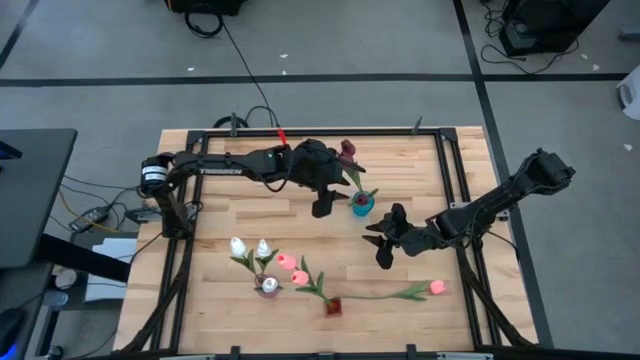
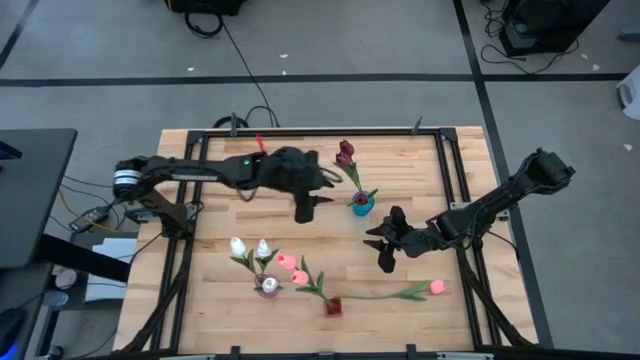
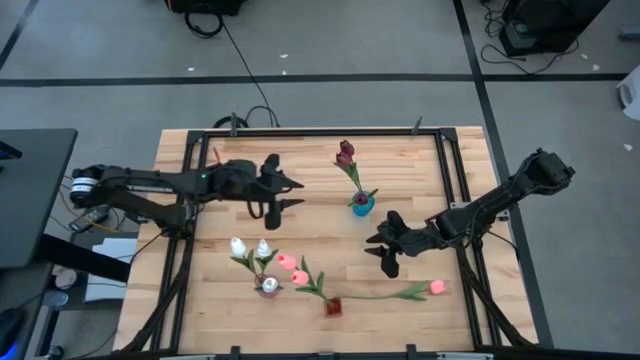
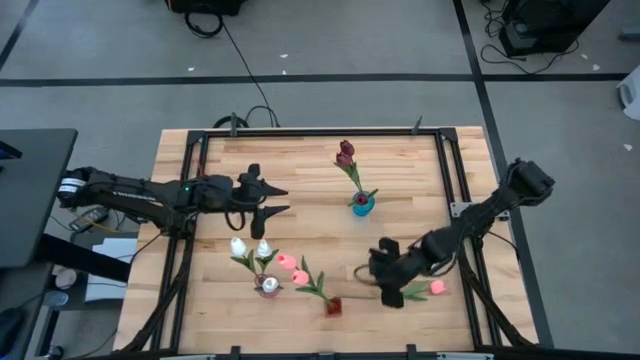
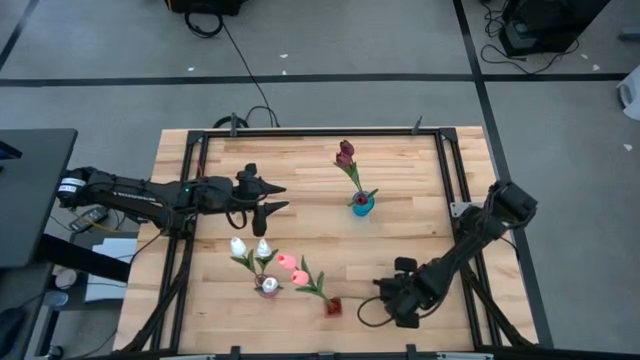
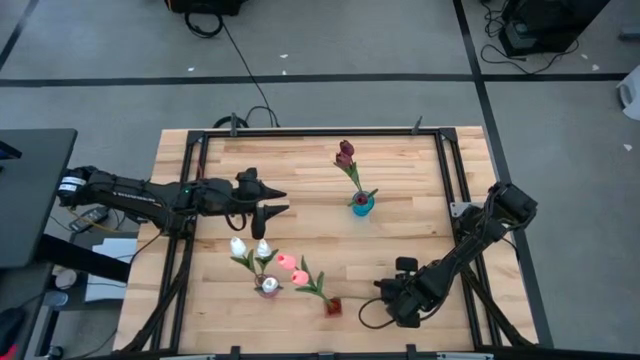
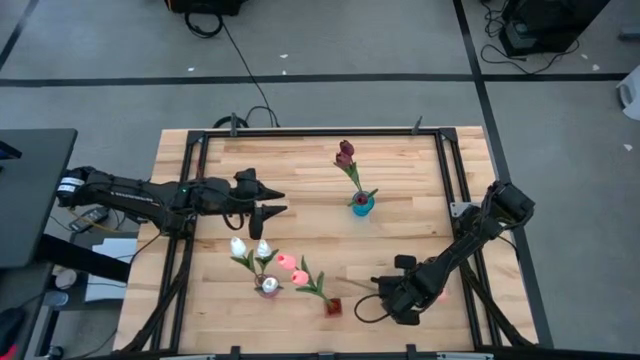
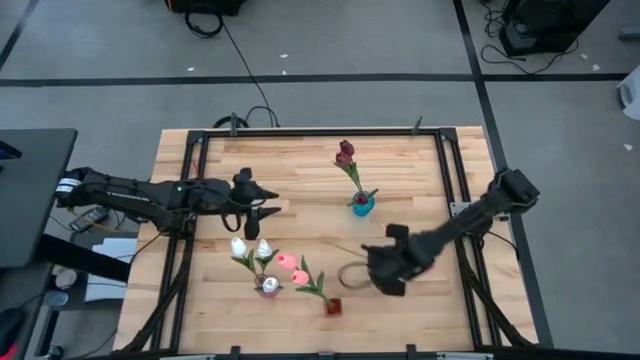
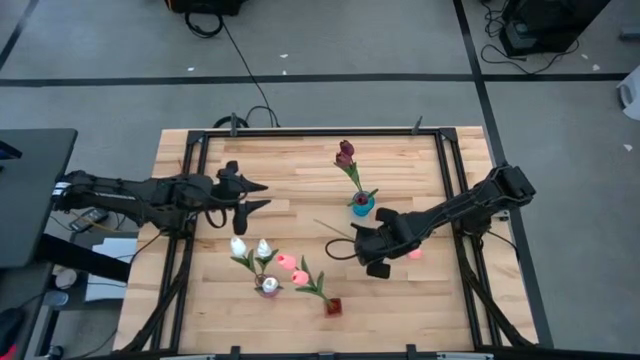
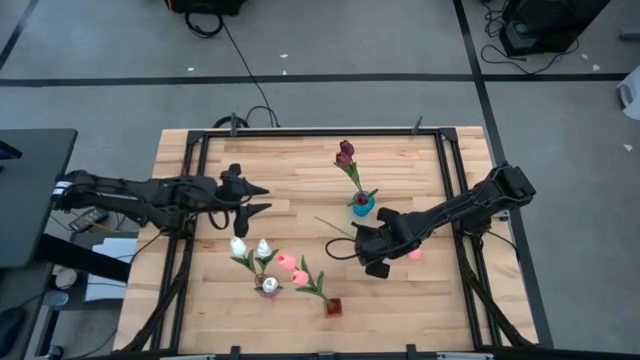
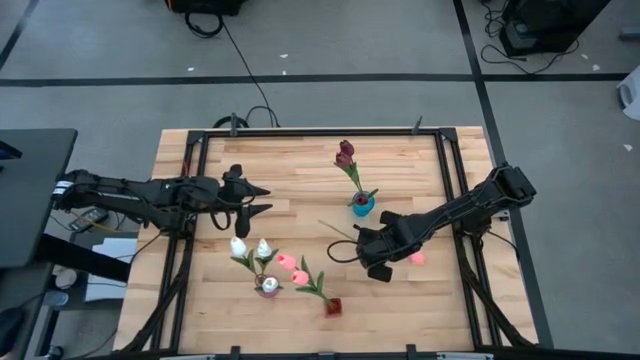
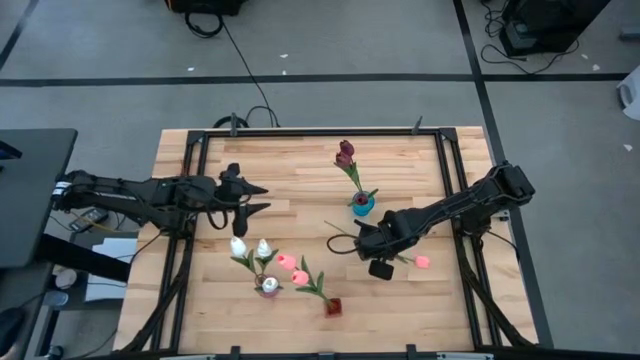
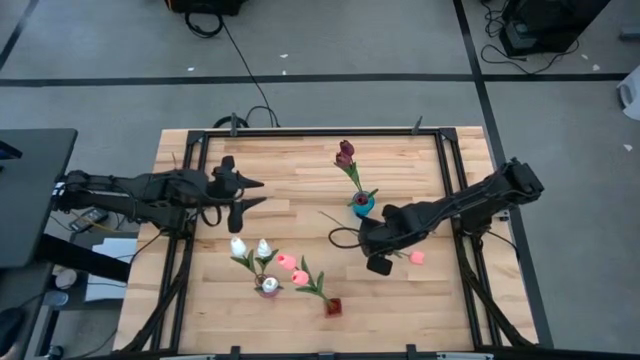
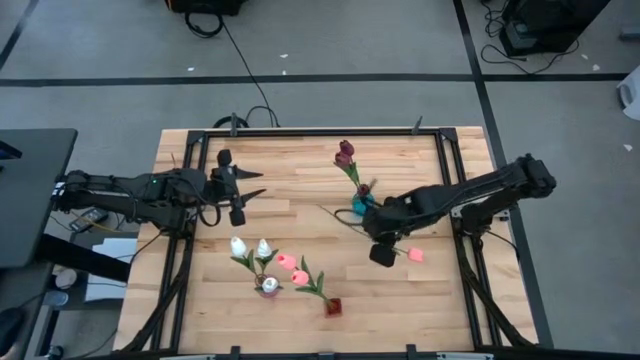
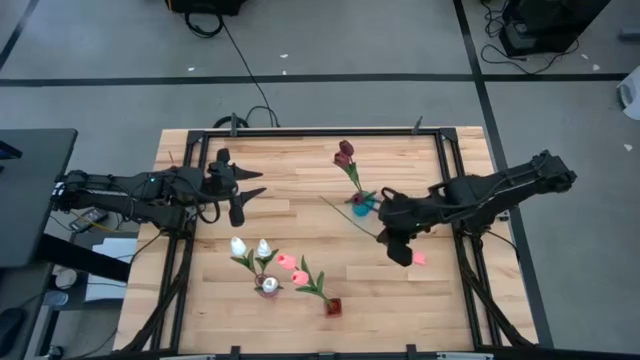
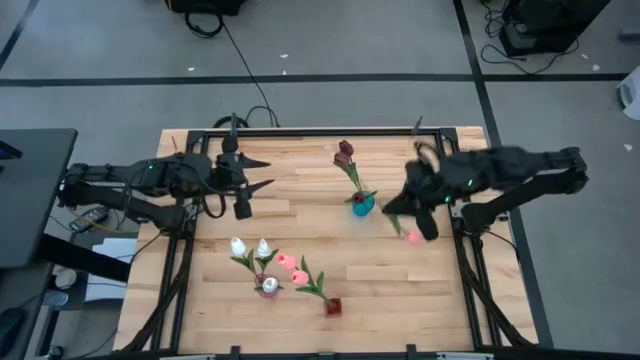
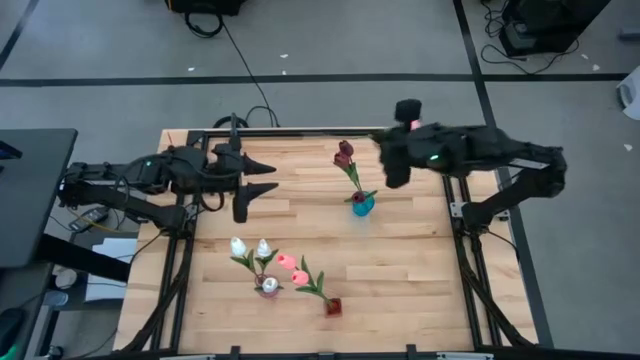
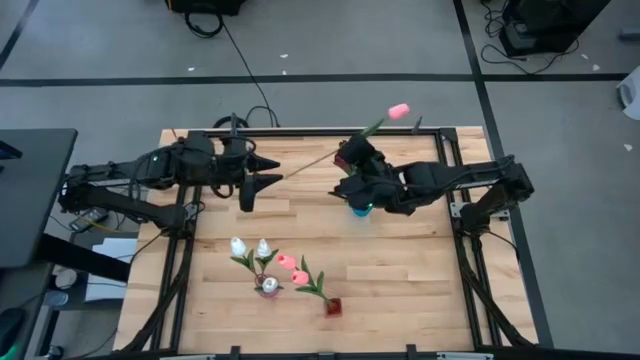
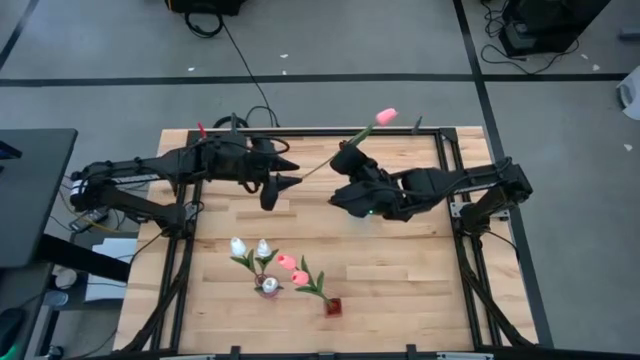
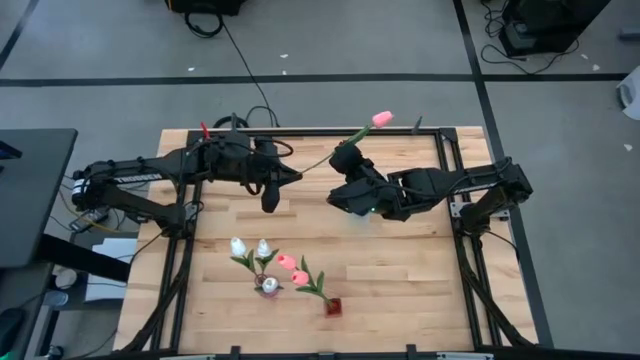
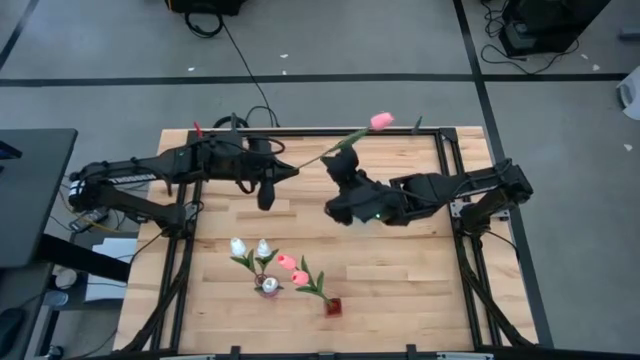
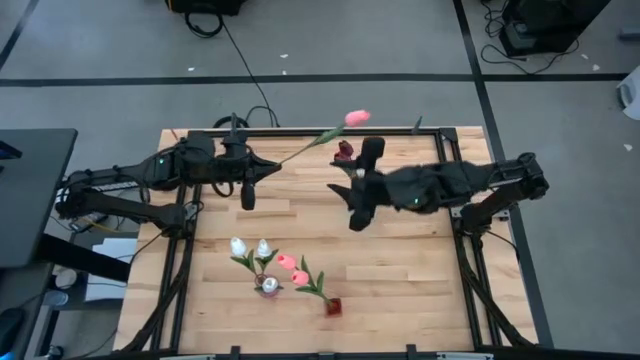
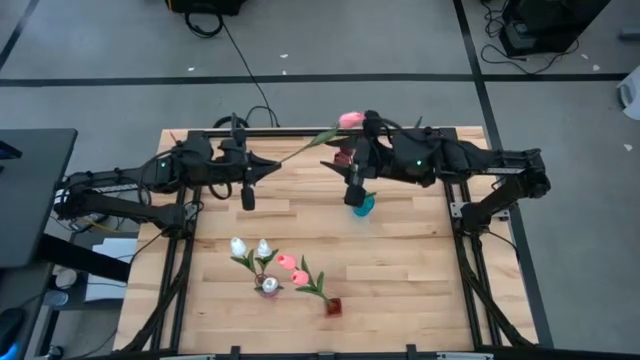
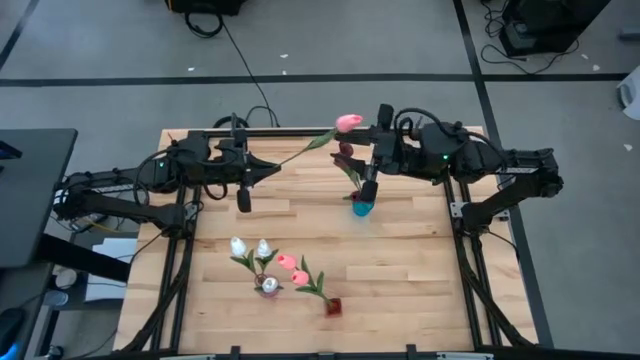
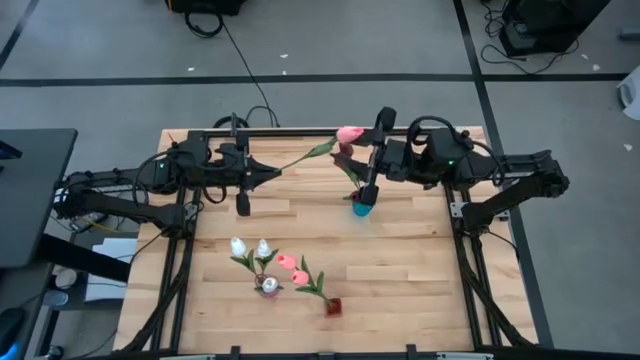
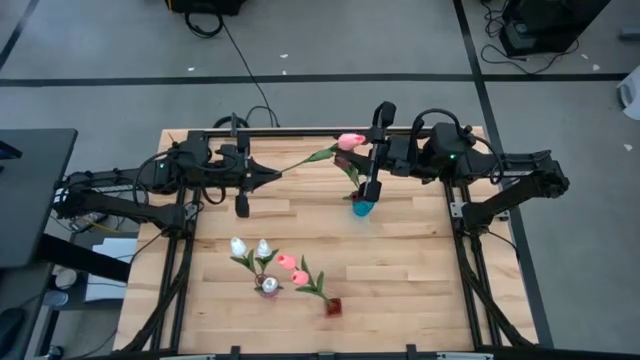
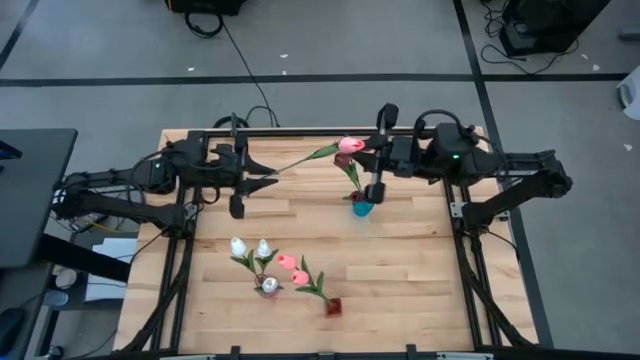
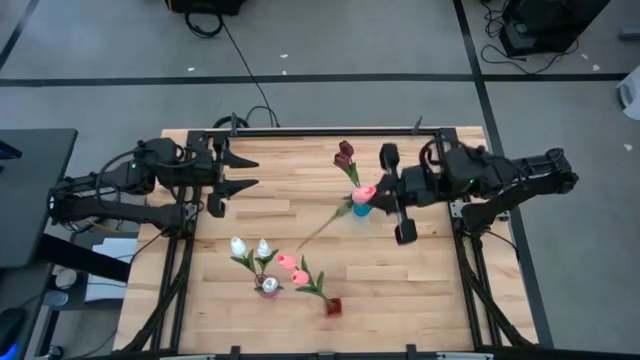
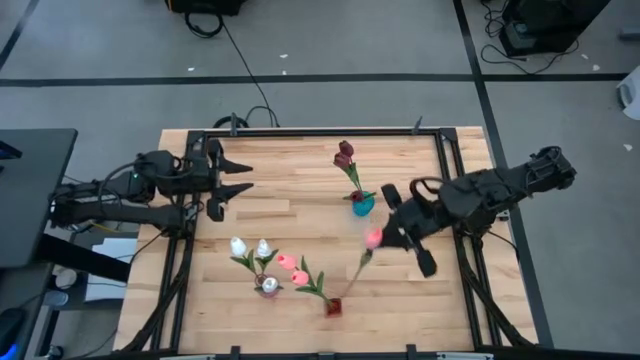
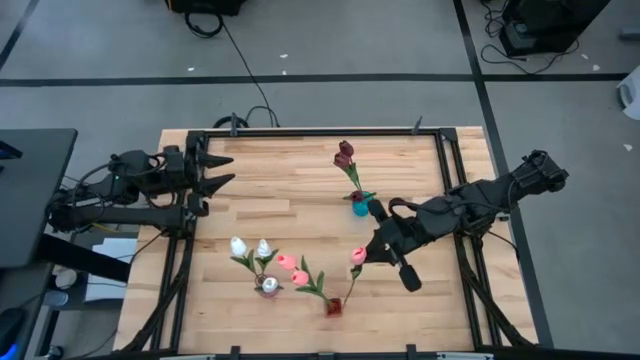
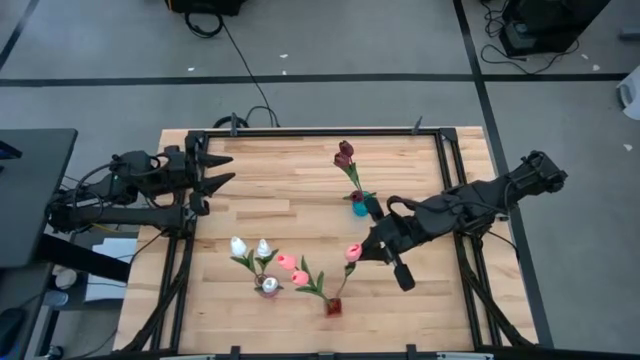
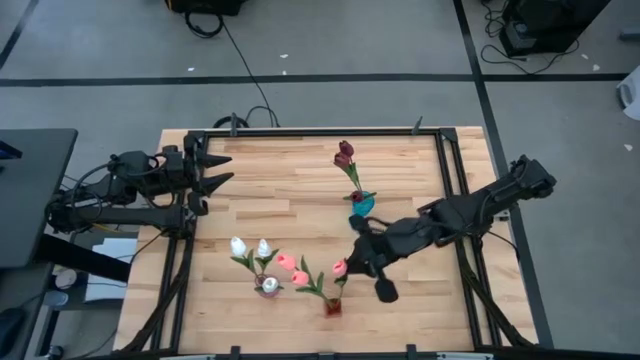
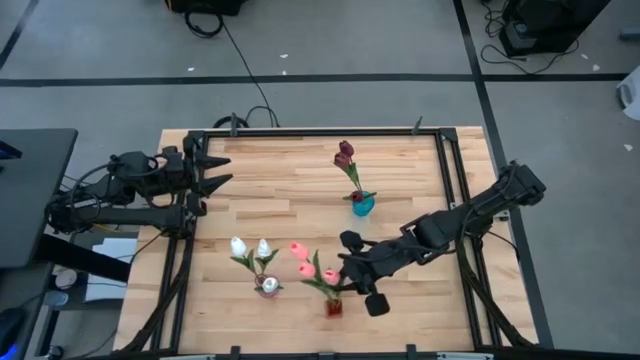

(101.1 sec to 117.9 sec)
Task: Sort flowers into vase by color
Put the pink flower into the red vase

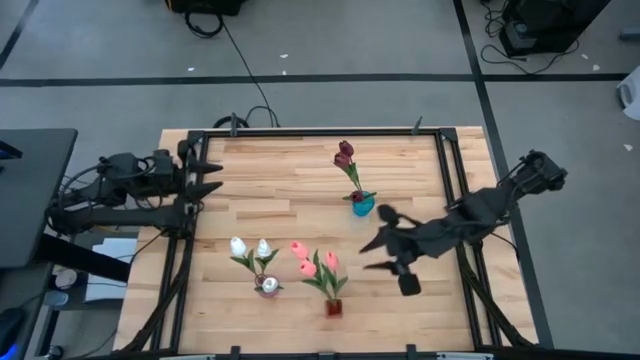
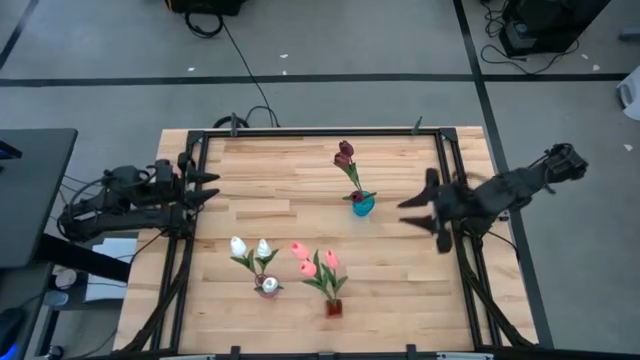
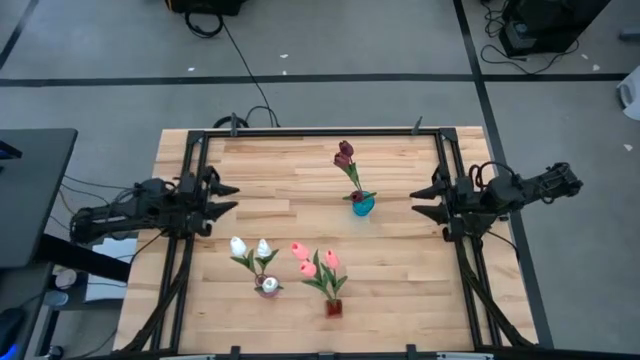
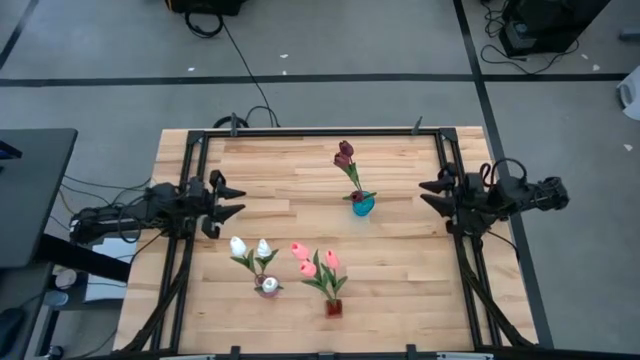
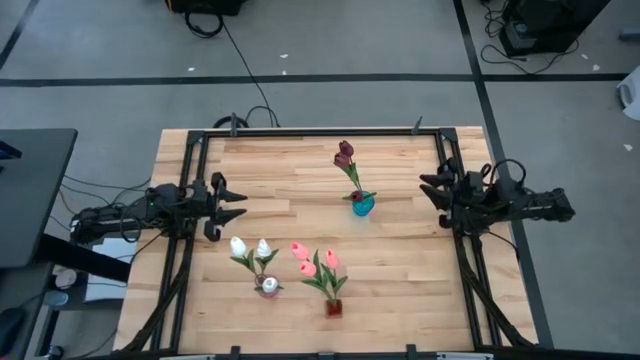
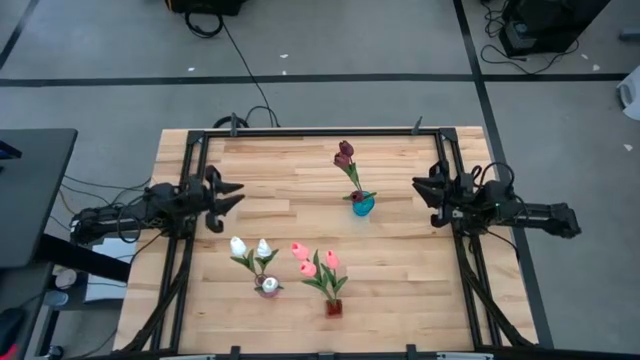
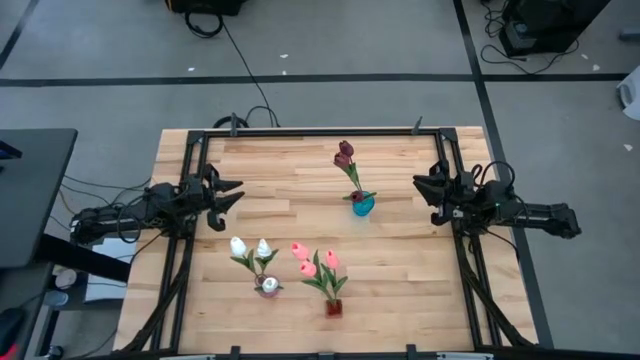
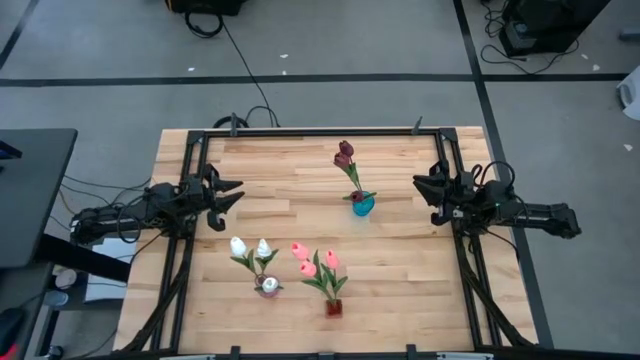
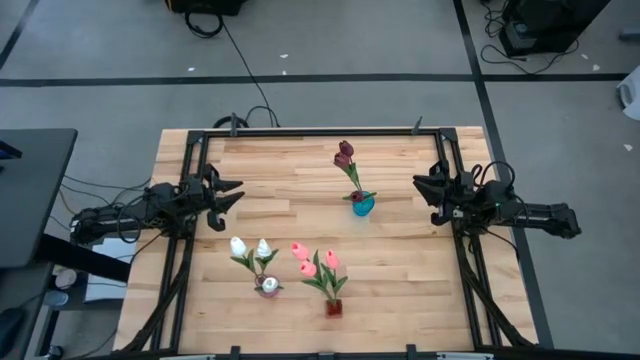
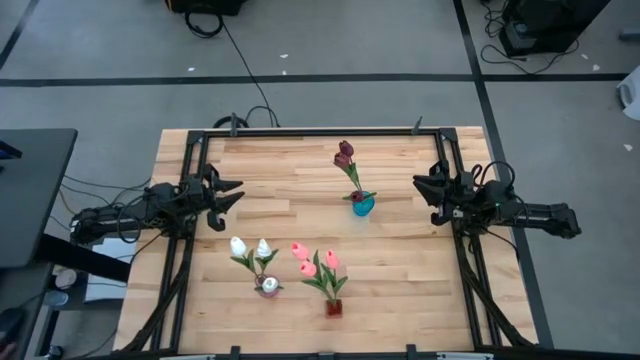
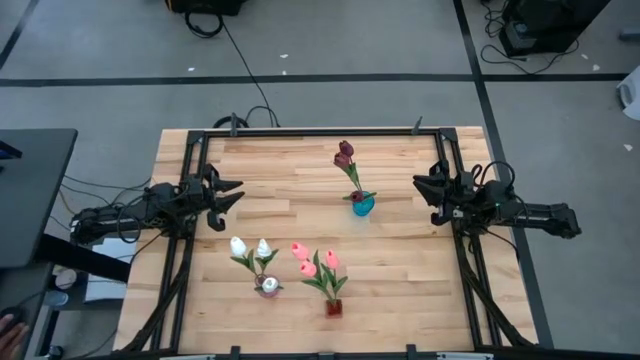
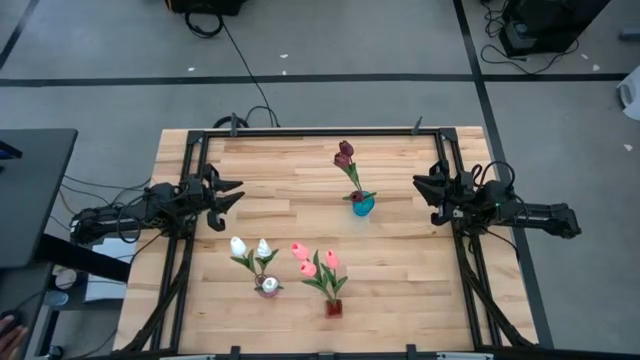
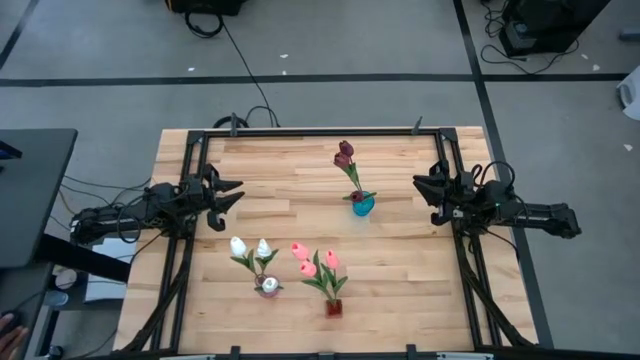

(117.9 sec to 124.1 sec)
Return to Home Position
